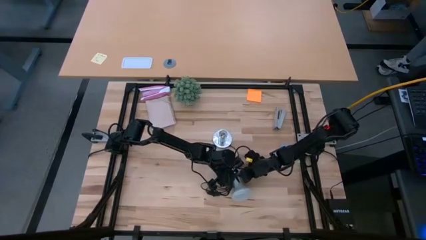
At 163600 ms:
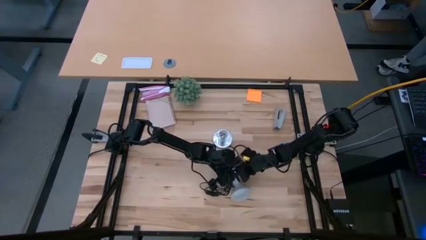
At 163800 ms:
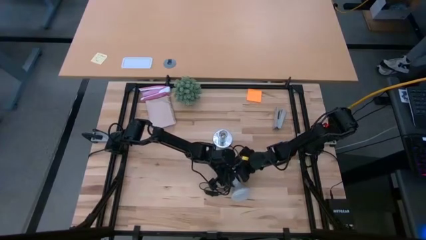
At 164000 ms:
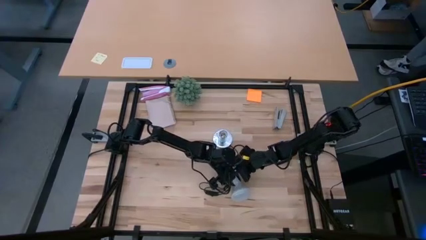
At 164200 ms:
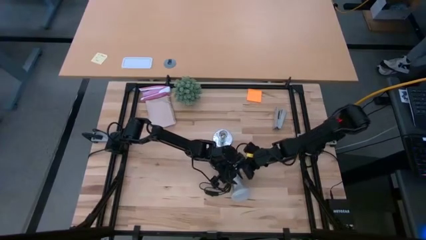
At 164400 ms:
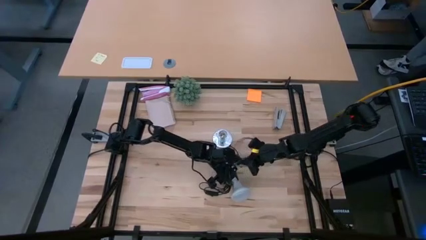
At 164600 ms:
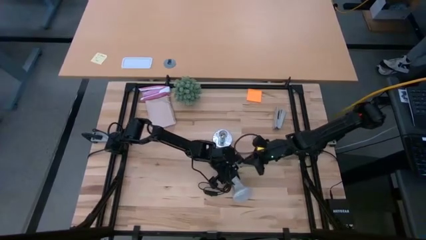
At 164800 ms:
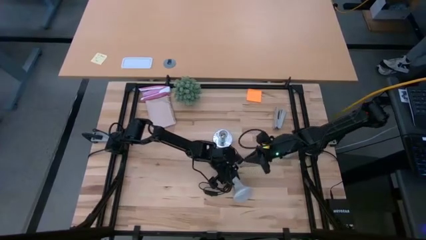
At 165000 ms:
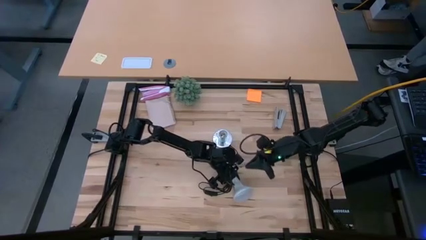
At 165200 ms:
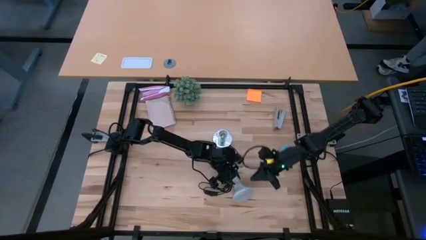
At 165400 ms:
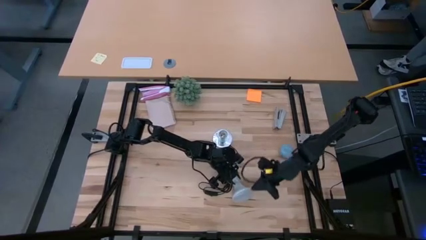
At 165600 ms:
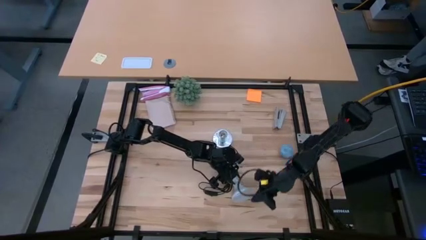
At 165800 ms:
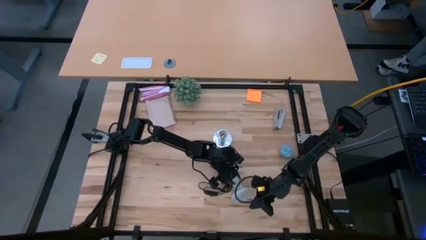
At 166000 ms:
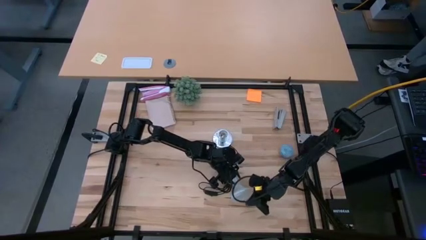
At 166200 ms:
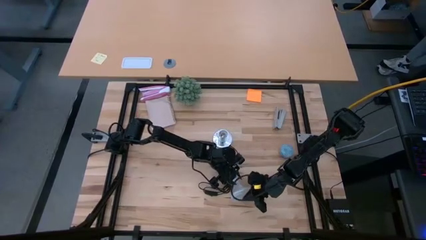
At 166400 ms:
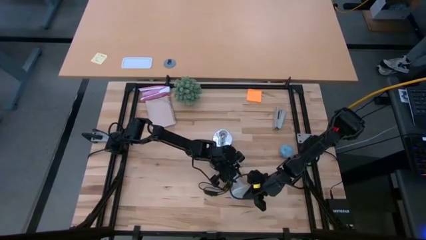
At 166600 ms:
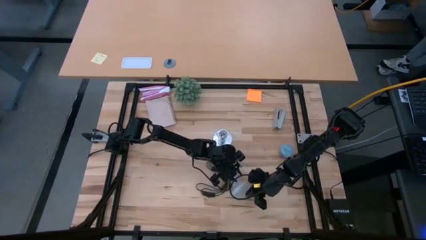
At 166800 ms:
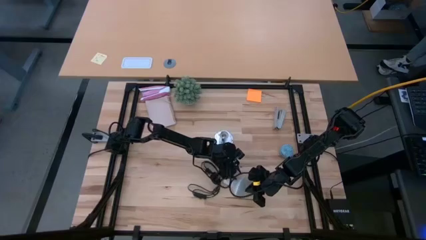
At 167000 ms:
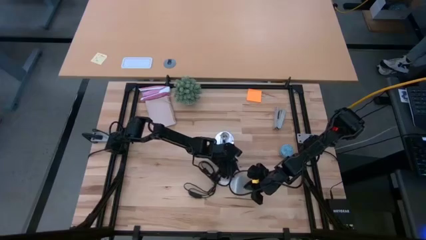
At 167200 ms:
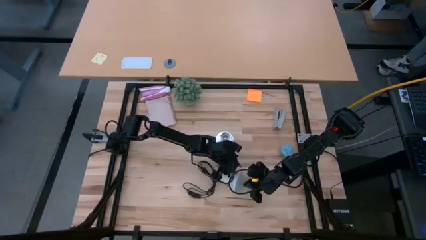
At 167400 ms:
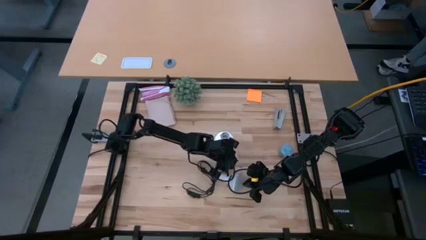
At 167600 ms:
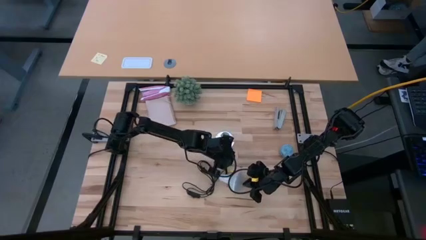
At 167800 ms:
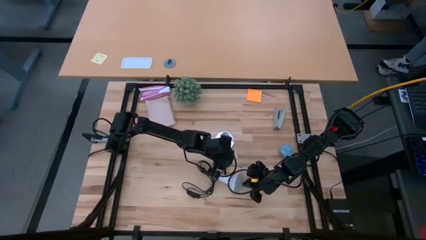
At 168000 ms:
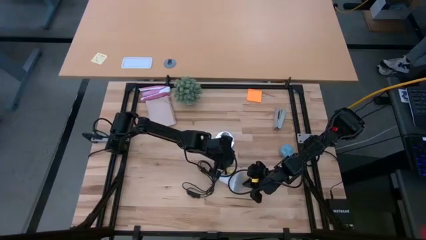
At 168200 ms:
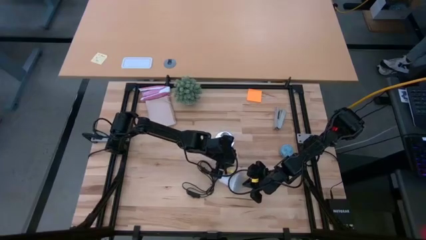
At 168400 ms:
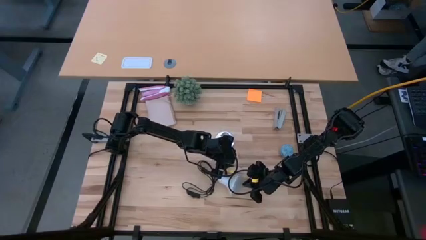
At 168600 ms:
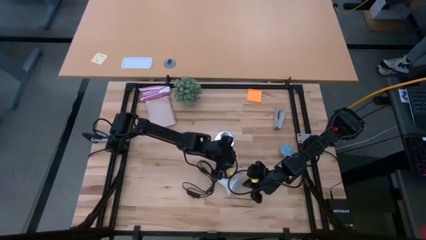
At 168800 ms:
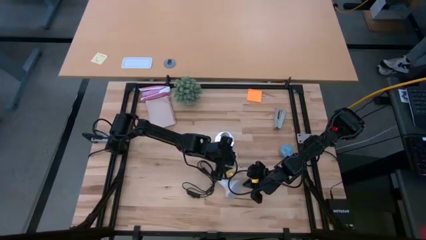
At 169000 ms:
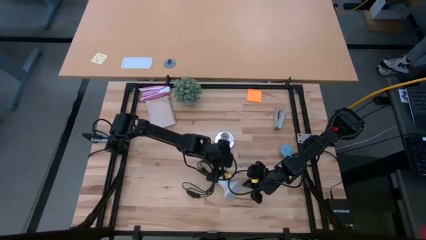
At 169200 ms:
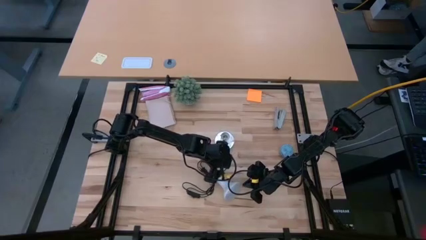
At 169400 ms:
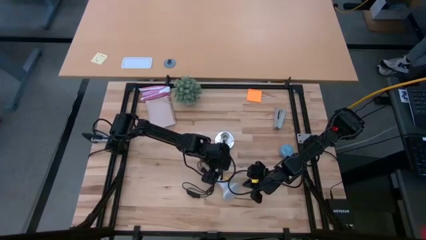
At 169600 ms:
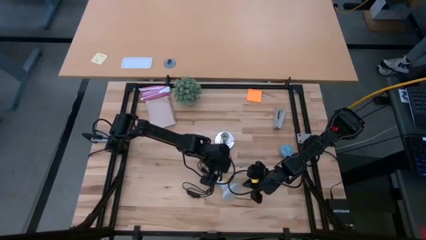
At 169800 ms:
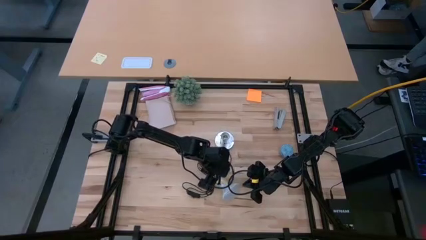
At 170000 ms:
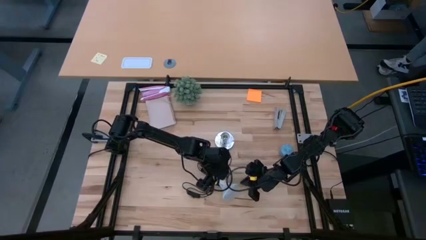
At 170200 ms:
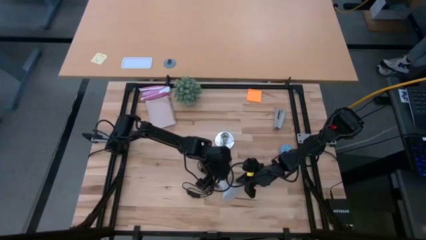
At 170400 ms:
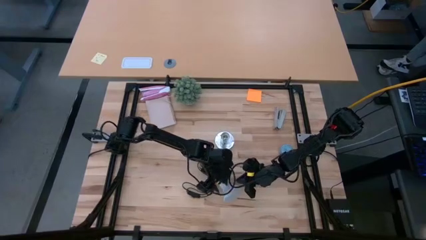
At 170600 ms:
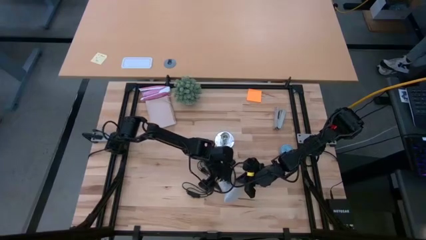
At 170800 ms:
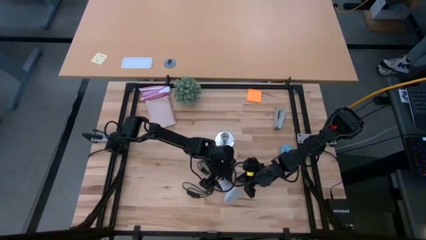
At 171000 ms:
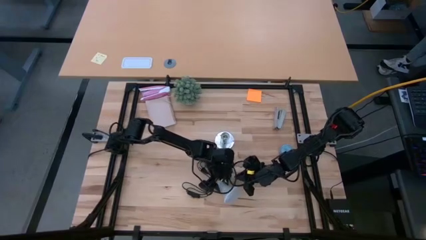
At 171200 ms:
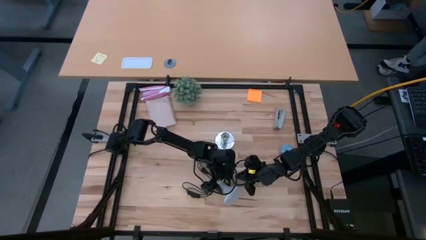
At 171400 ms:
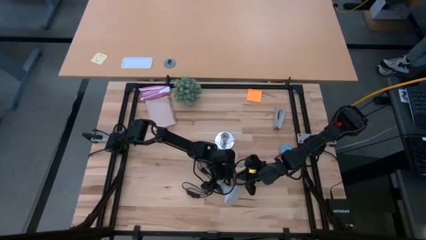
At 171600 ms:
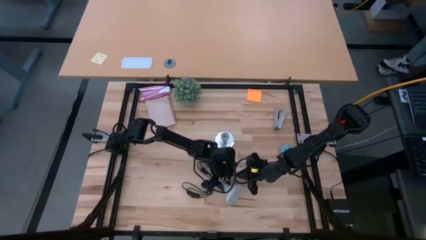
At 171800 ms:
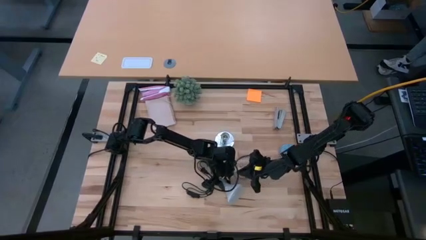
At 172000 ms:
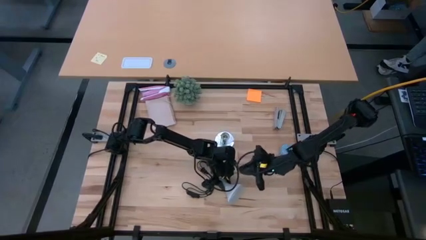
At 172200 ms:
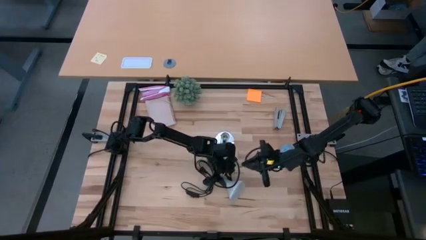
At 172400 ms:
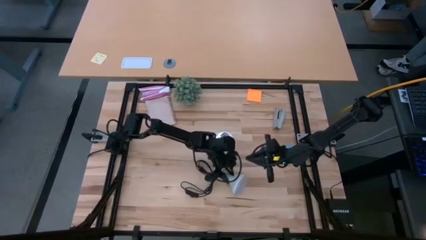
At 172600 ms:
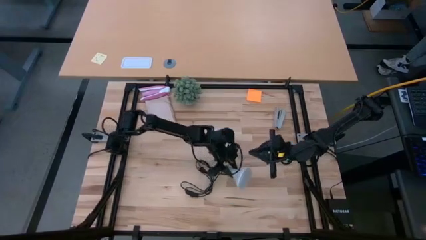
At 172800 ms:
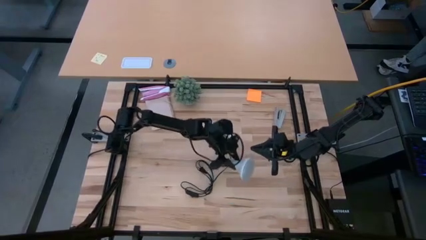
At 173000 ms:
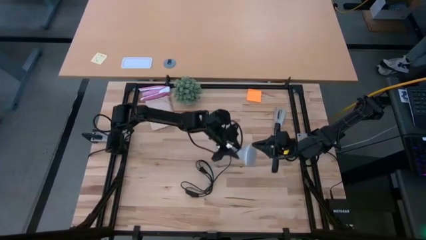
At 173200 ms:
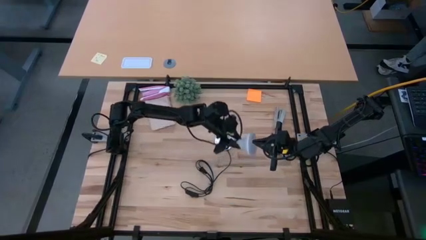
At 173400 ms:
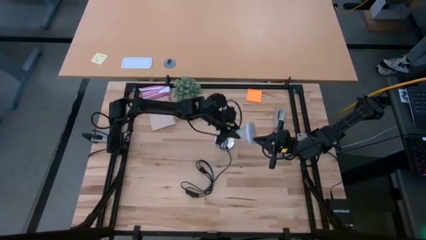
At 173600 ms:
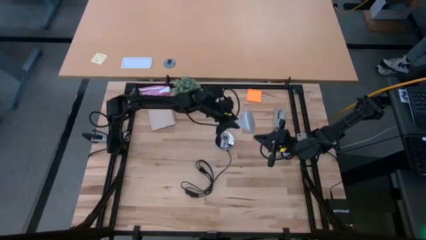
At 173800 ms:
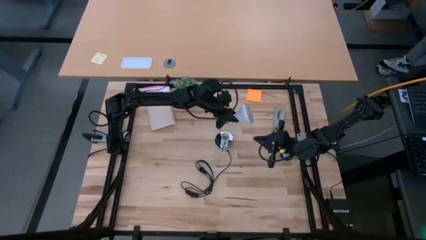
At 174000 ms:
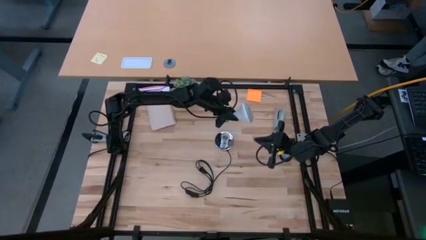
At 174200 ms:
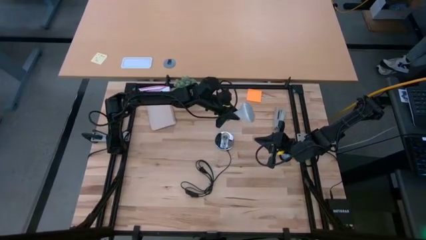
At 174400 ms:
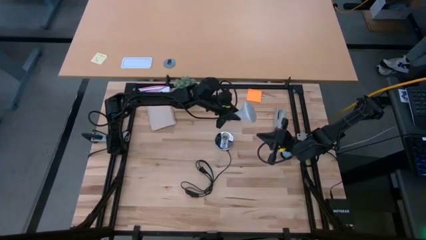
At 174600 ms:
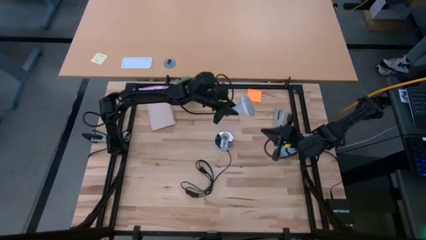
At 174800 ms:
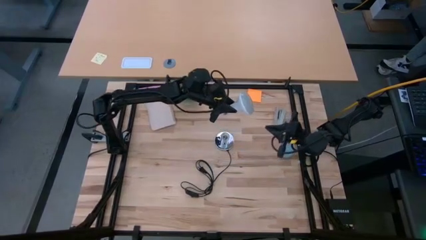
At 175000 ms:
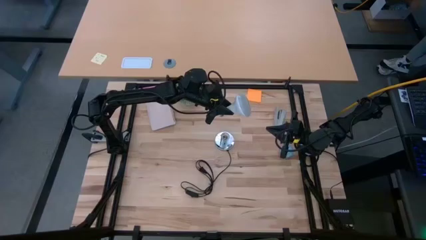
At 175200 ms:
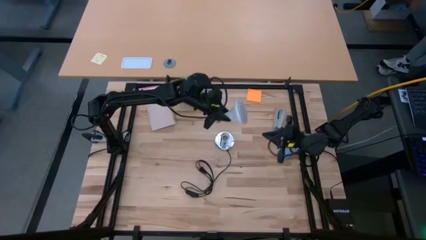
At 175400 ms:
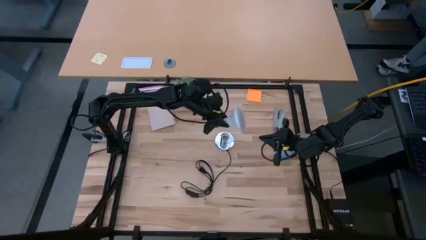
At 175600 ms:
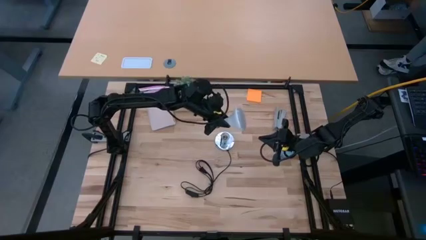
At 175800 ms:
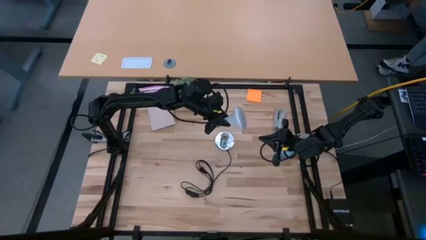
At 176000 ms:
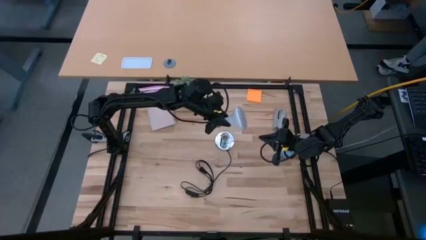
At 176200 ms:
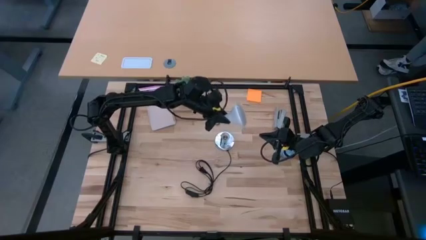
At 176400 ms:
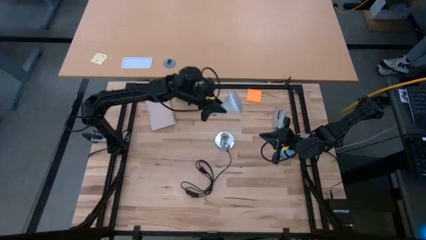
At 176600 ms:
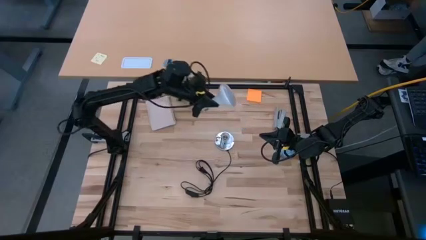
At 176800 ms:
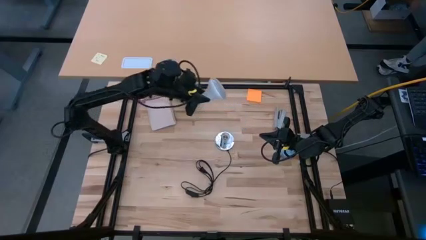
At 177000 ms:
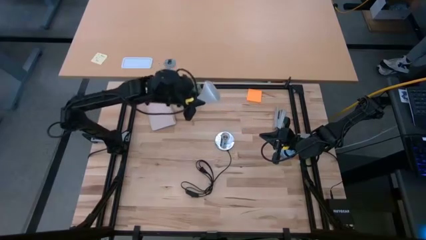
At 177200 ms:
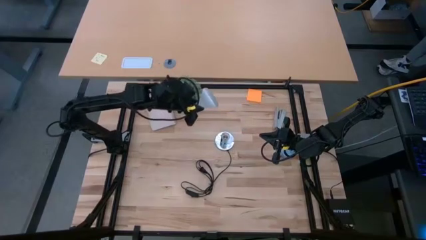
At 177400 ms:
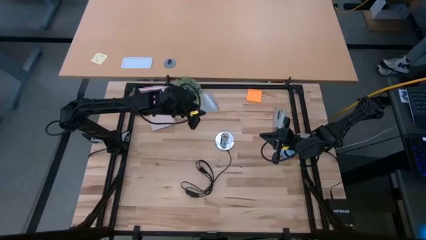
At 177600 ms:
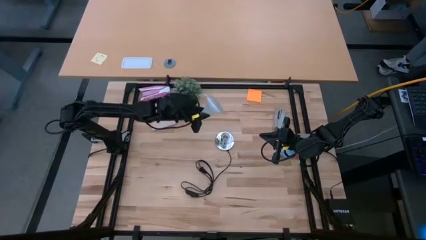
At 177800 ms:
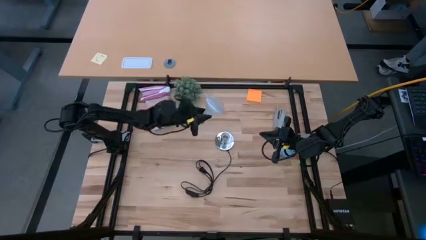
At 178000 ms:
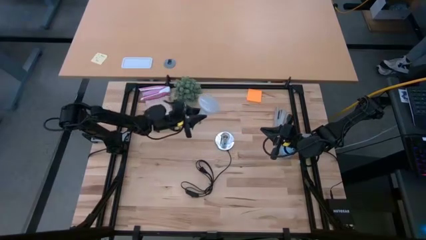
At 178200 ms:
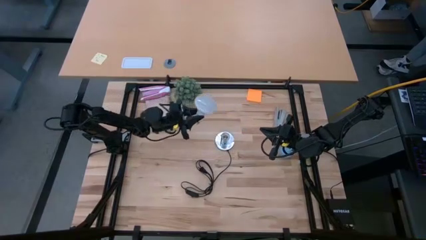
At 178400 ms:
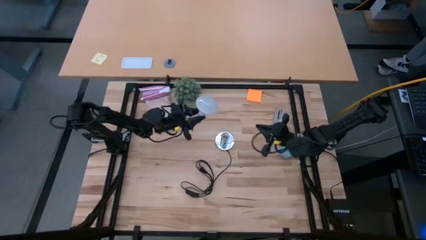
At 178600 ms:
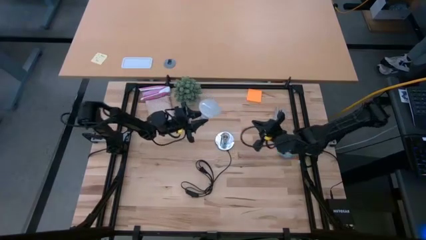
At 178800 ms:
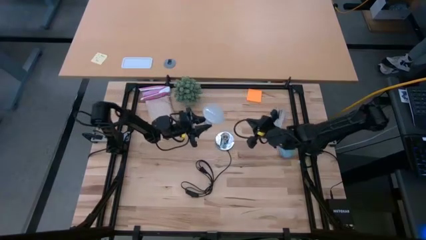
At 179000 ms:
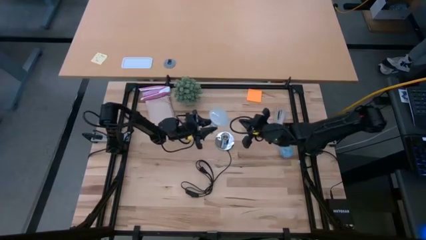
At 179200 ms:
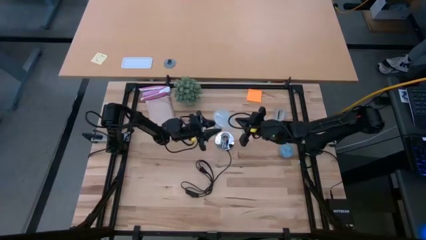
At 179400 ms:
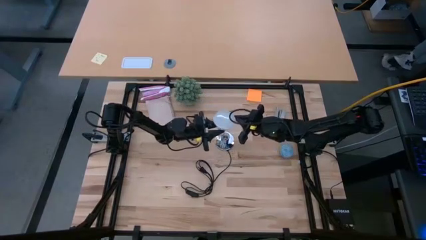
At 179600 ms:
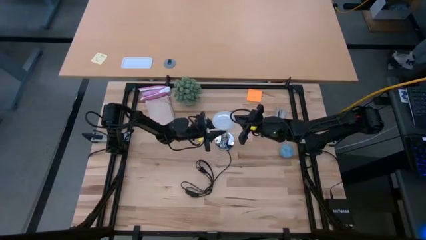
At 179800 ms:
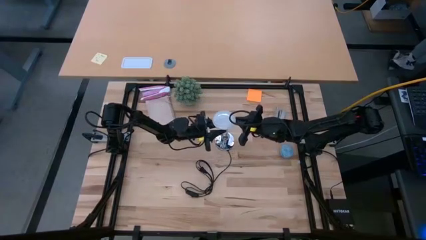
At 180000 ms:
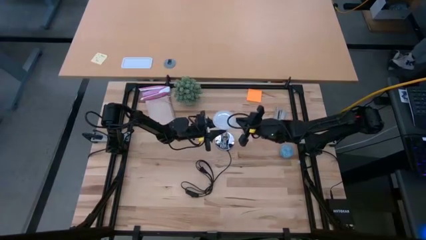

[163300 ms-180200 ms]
Task: Screw lightbulb
Insert the lightbulb into the lamp
